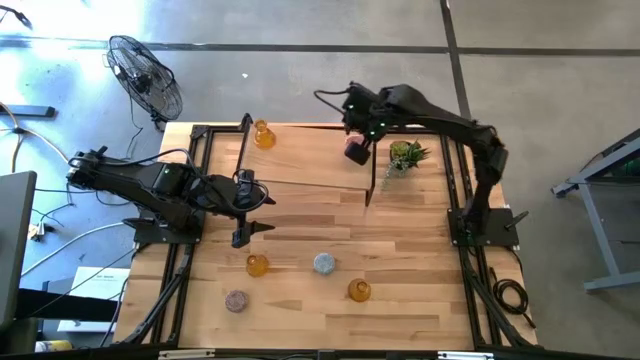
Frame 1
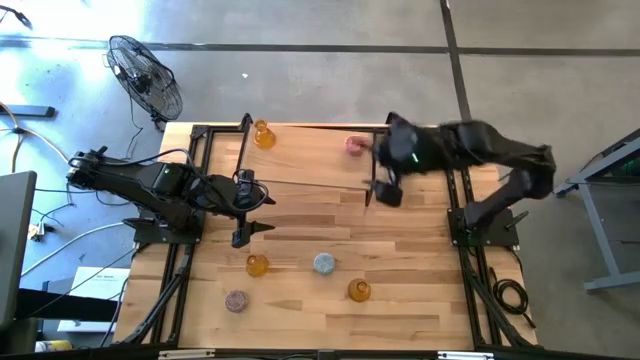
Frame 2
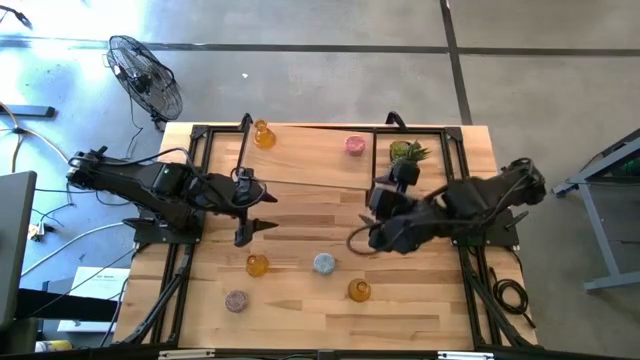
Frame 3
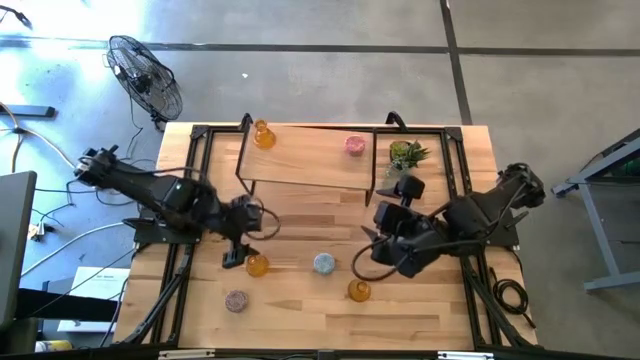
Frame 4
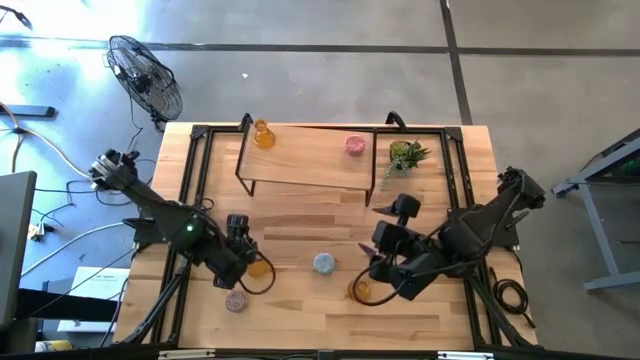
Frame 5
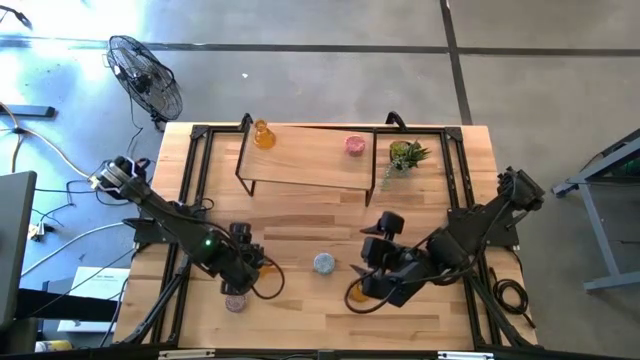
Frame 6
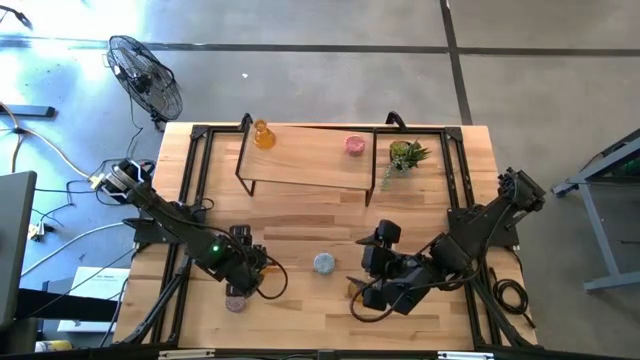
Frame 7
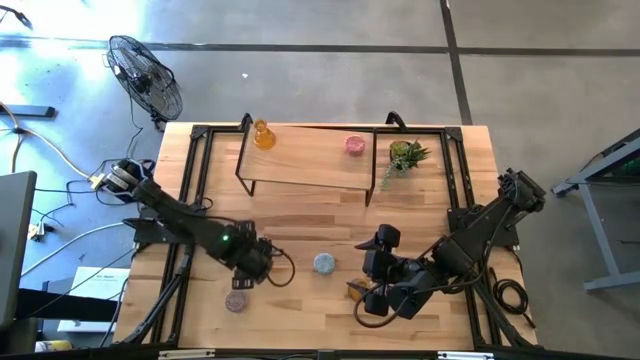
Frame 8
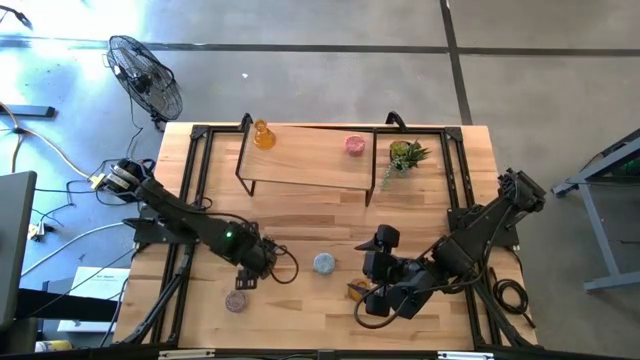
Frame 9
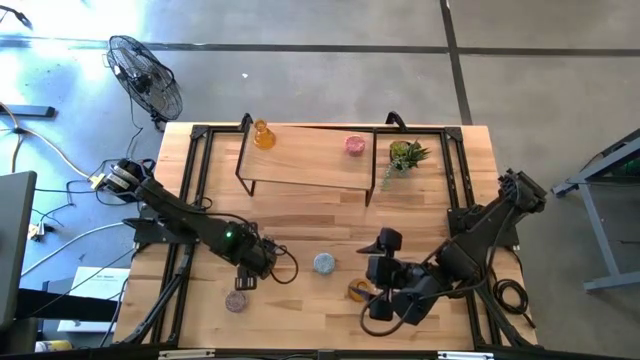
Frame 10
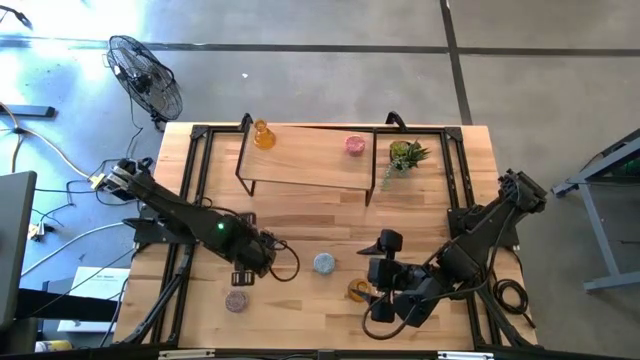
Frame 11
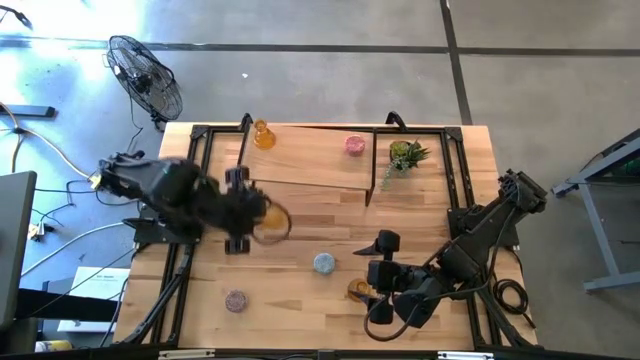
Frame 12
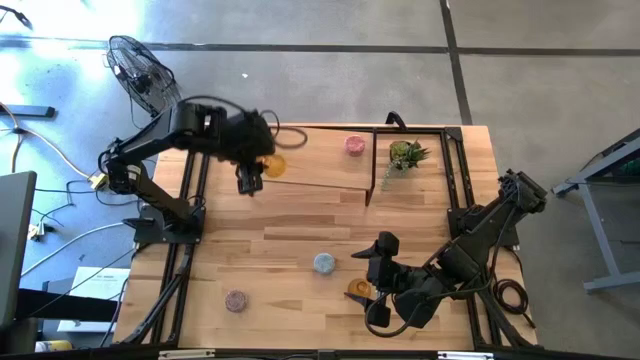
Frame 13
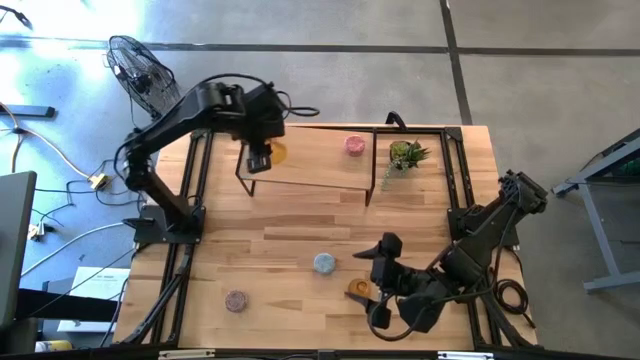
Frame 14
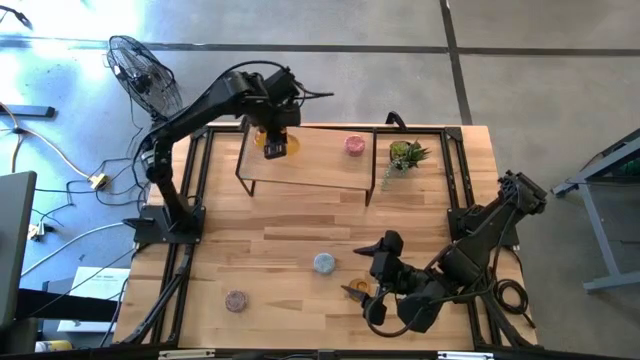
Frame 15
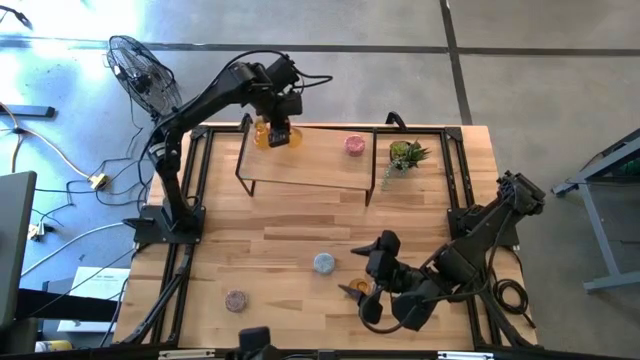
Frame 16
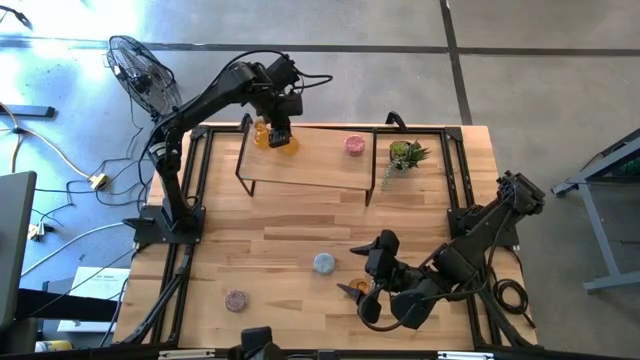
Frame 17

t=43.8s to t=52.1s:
Task: Pick & Place candle stick holders
Put the top yellow candle holder on the shelf

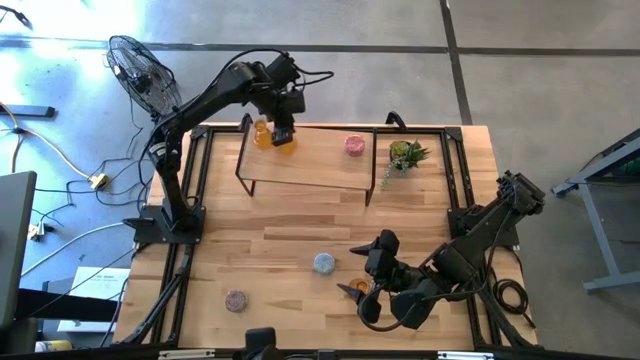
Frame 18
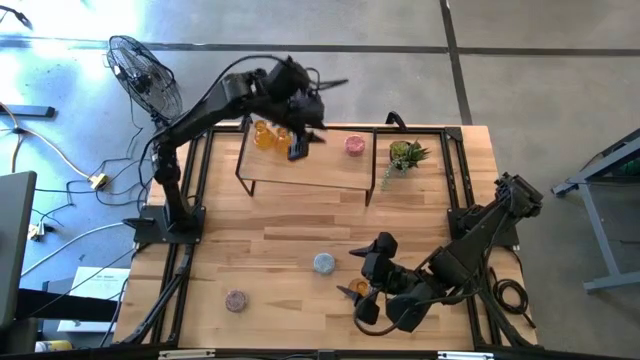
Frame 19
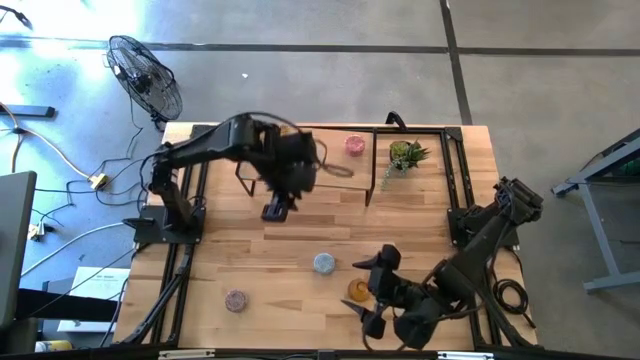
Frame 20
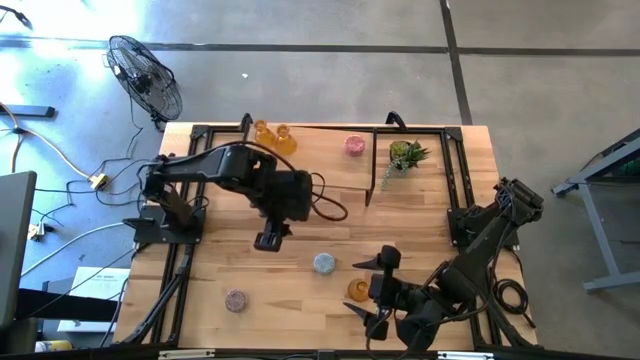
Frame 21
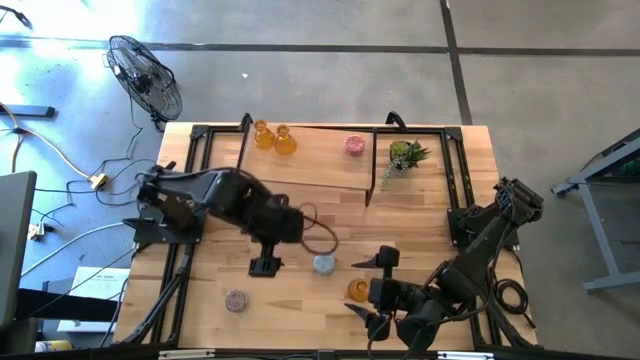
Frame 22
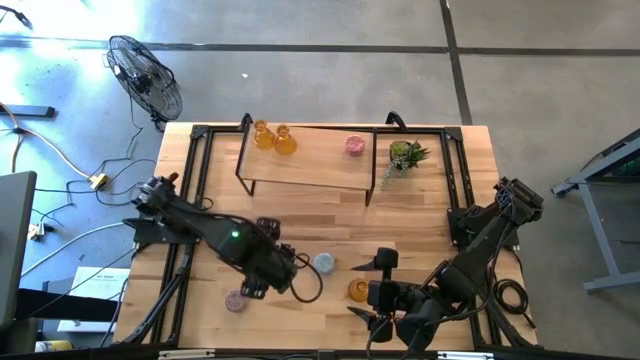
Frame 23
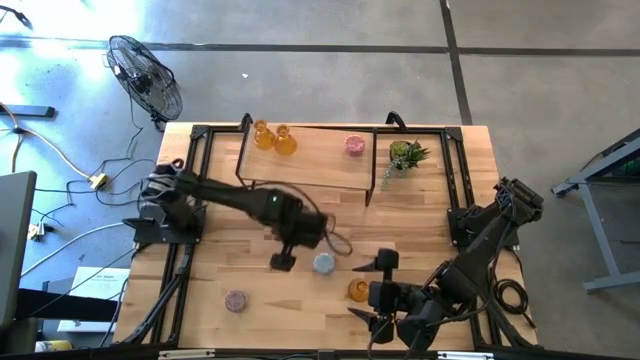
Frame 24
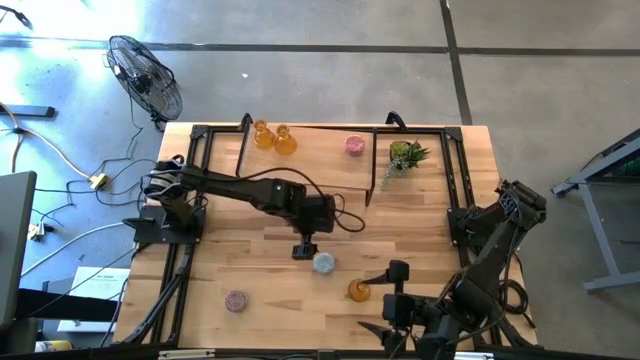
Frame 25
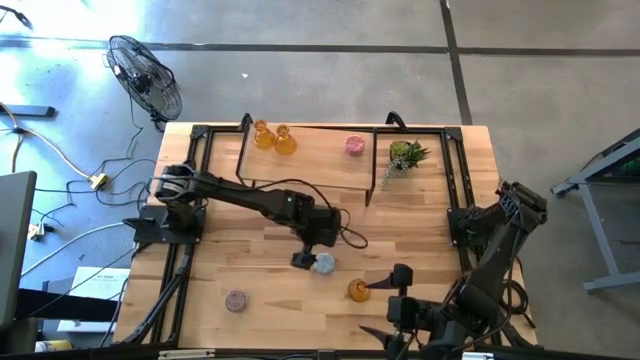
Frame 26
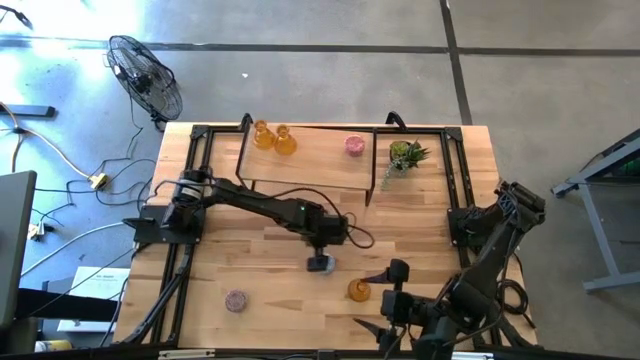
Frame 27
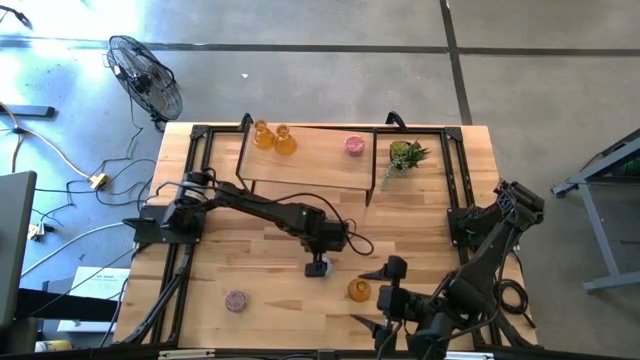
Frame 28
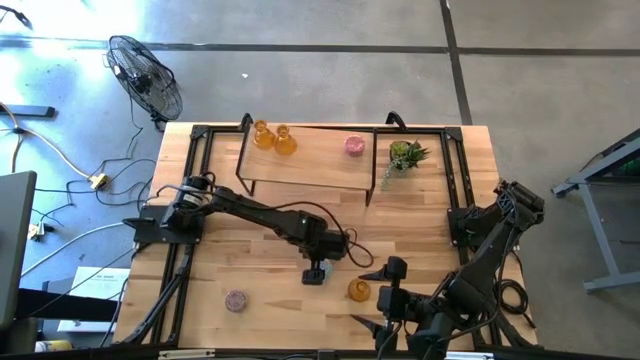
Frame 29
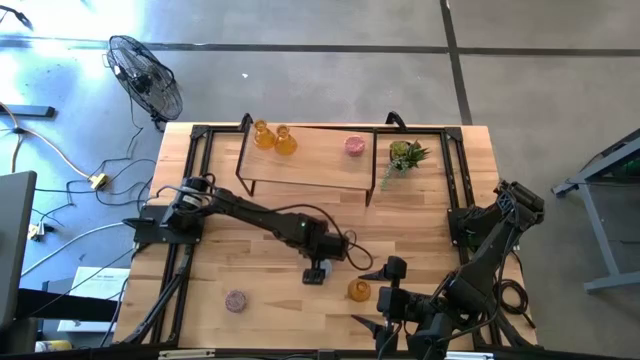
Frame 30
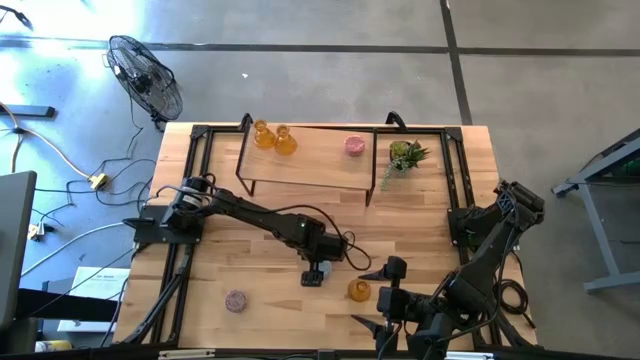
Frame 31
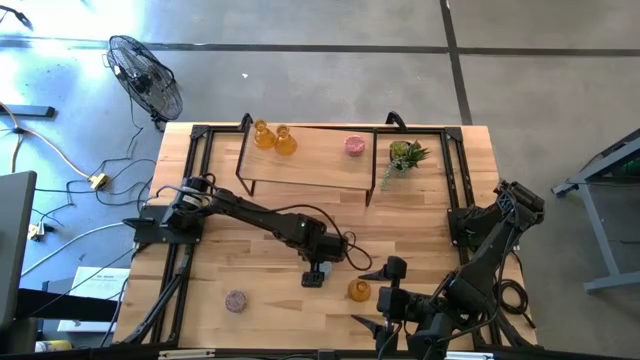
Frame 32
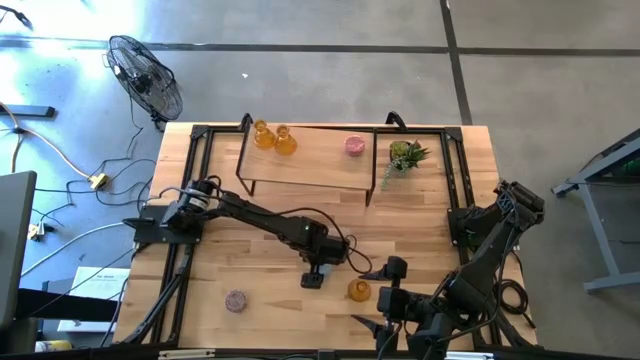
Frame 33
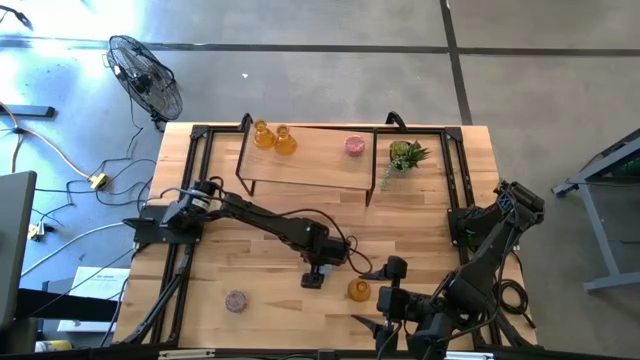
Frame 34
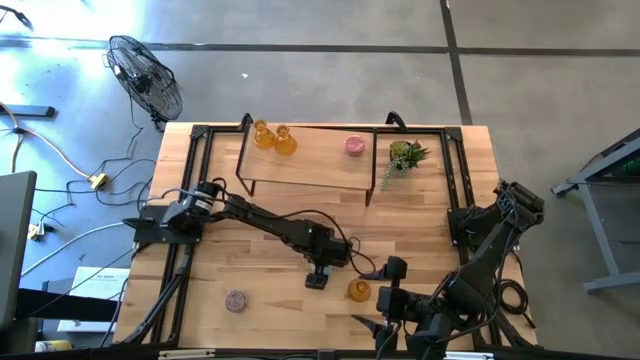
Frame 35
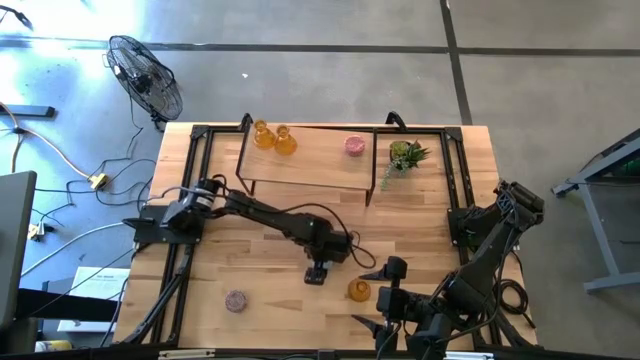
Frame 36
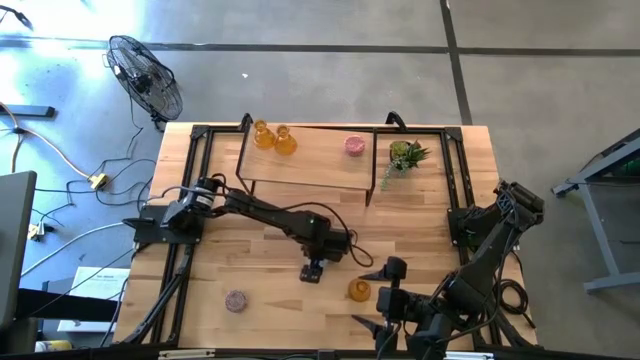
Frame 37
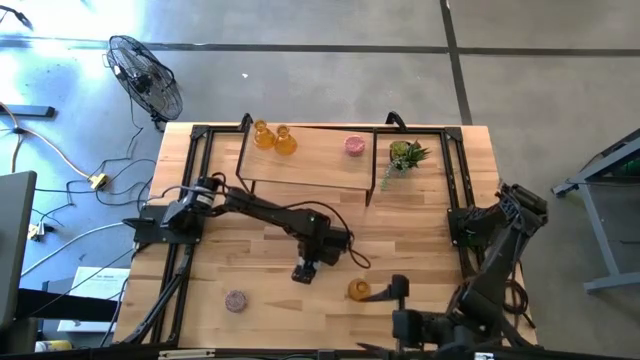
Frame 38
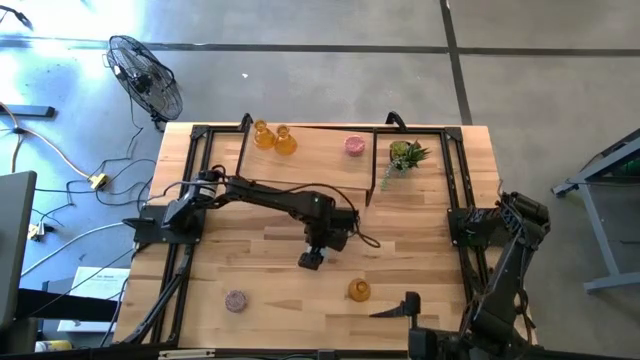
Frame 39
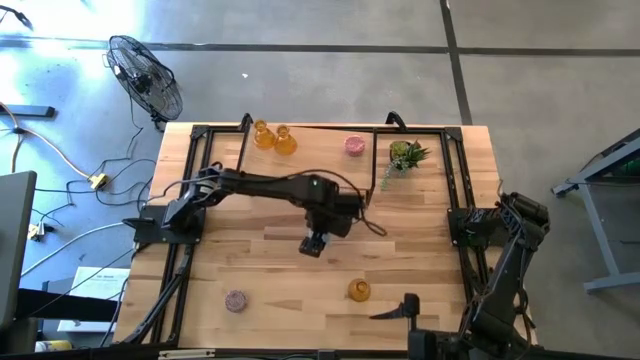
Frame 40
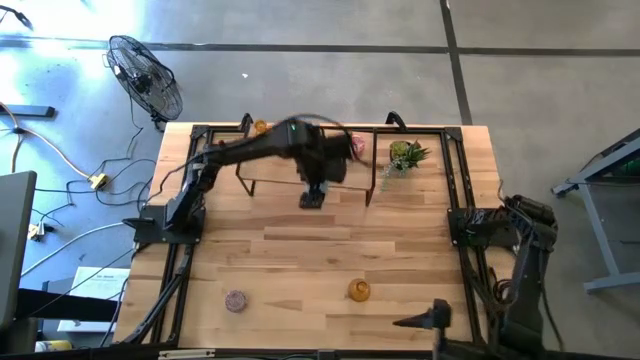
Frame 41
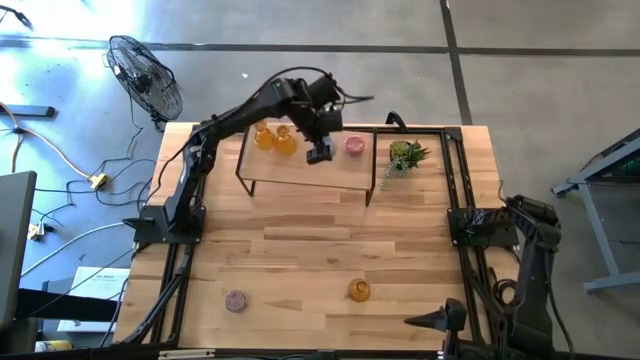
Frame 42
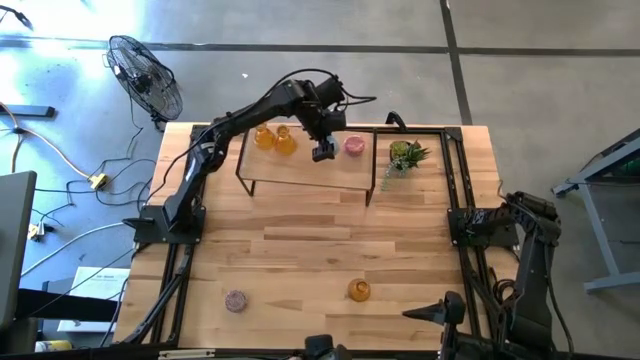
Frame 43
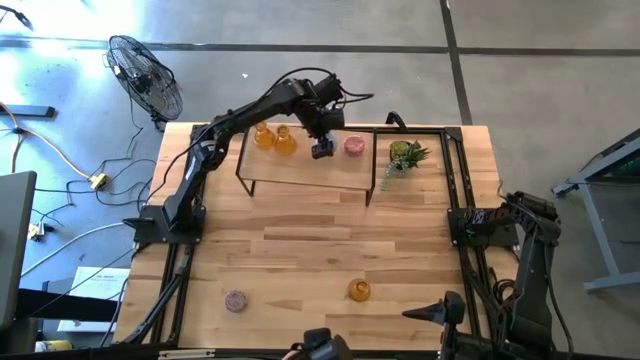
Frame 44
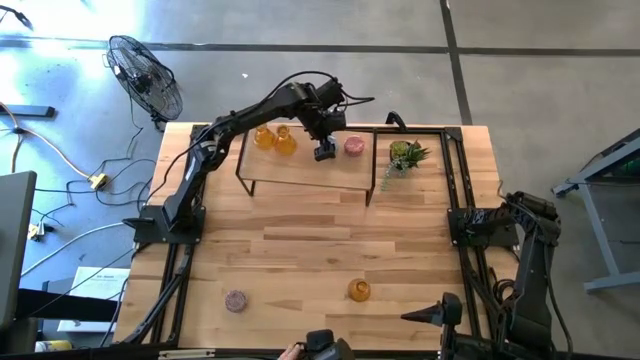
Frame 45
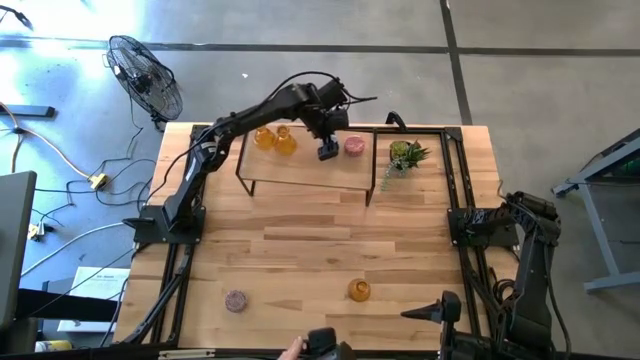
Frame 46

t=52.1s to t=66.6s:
Put the blue scented candle on the shelf
